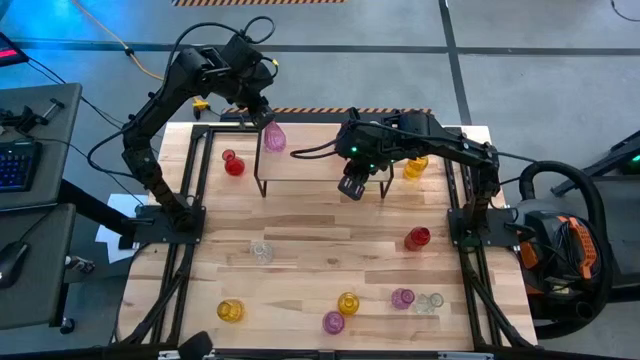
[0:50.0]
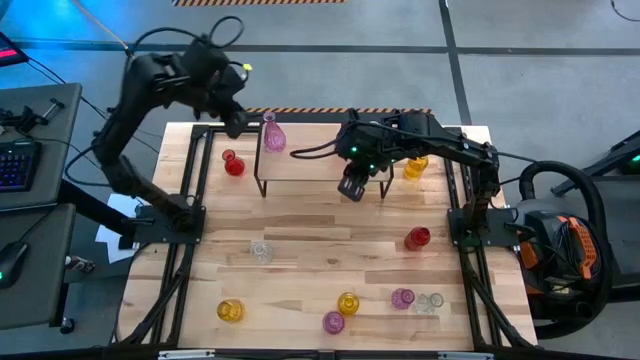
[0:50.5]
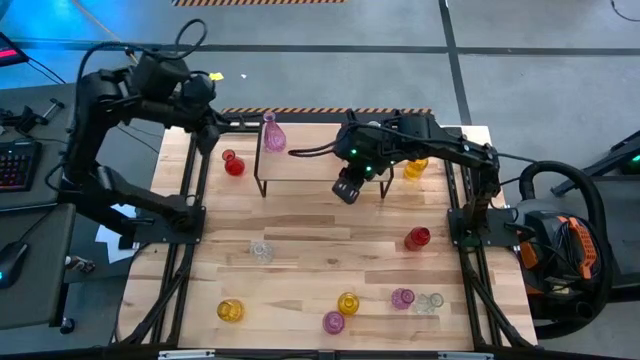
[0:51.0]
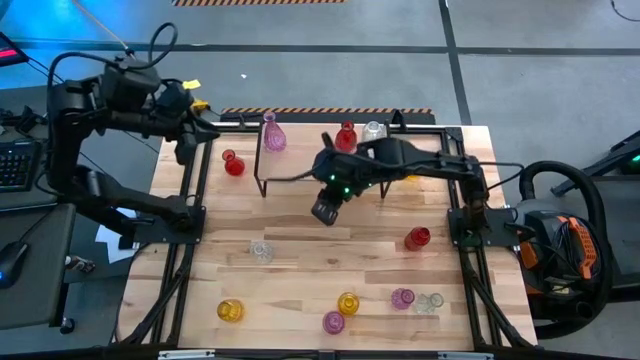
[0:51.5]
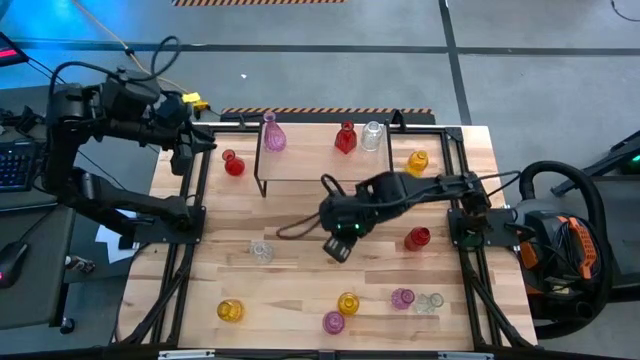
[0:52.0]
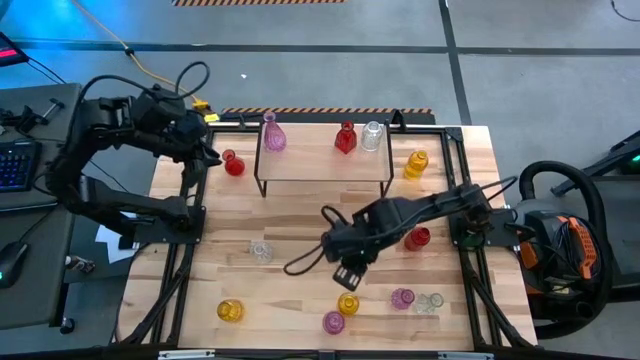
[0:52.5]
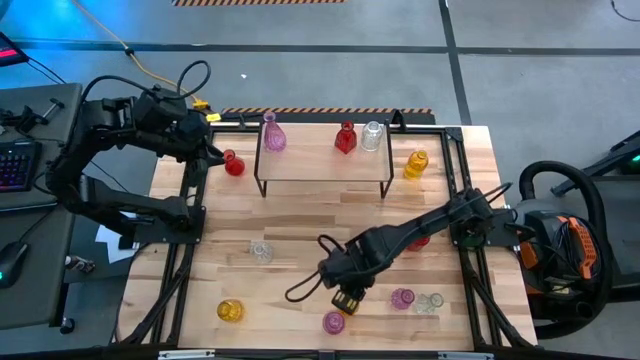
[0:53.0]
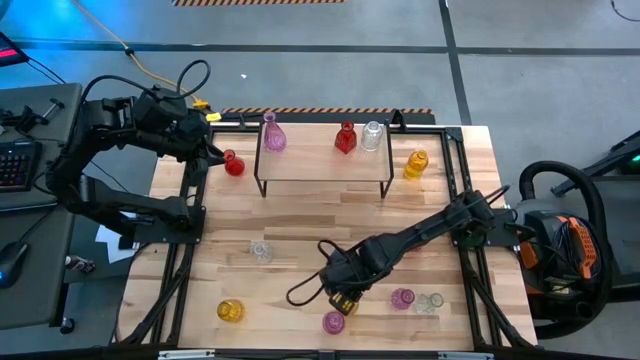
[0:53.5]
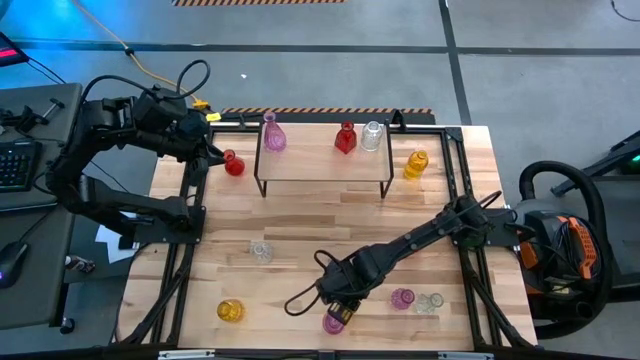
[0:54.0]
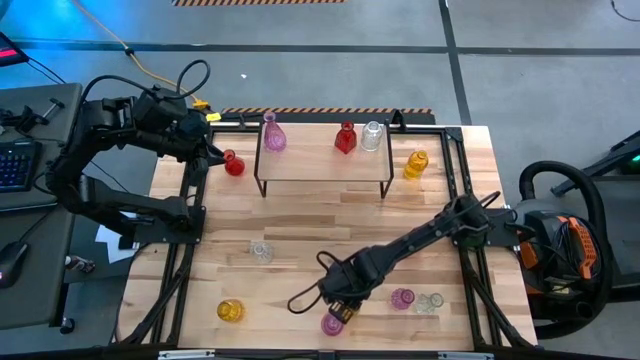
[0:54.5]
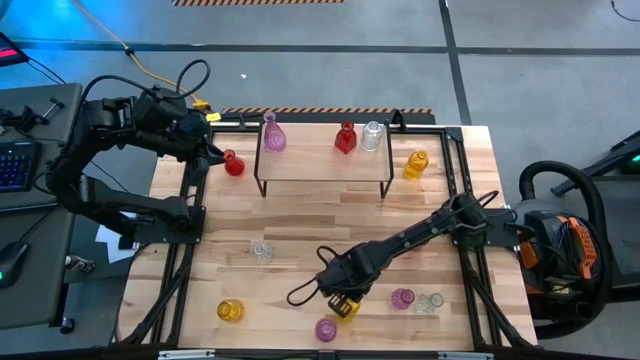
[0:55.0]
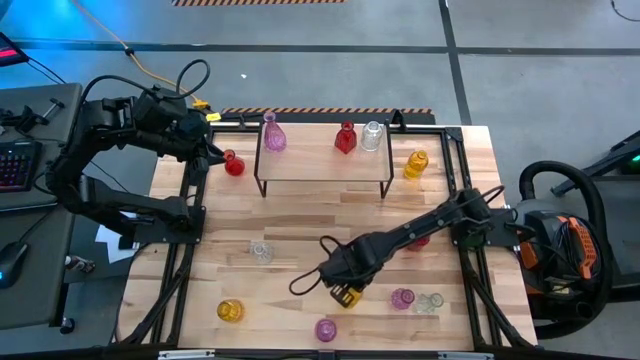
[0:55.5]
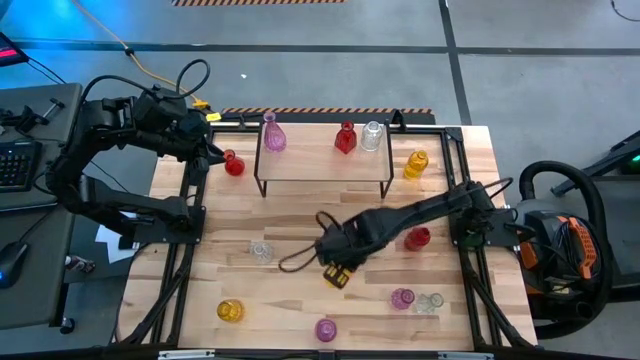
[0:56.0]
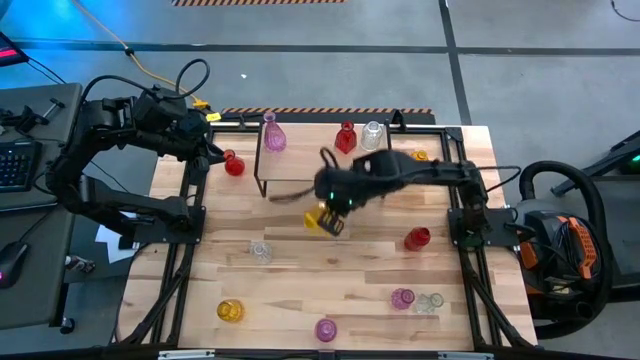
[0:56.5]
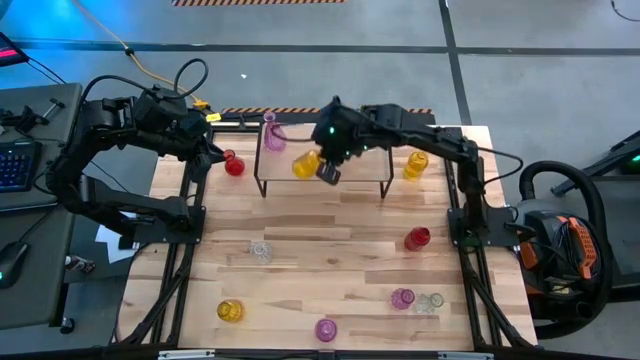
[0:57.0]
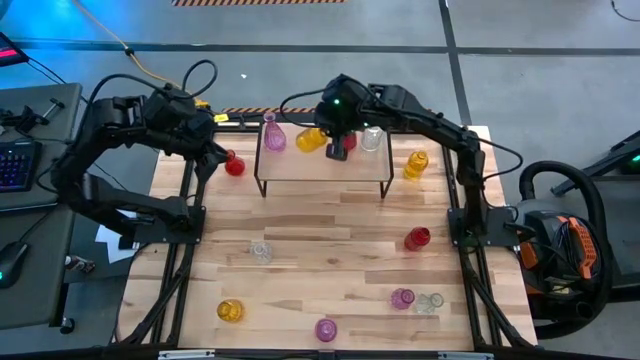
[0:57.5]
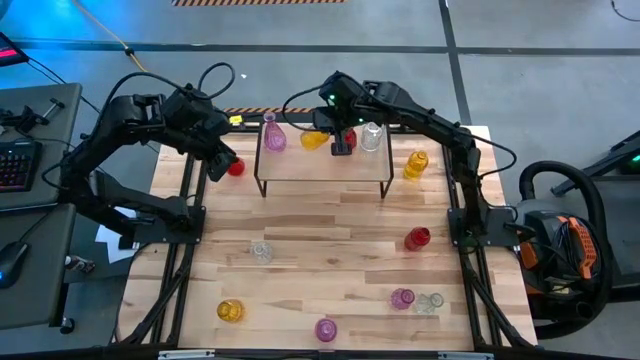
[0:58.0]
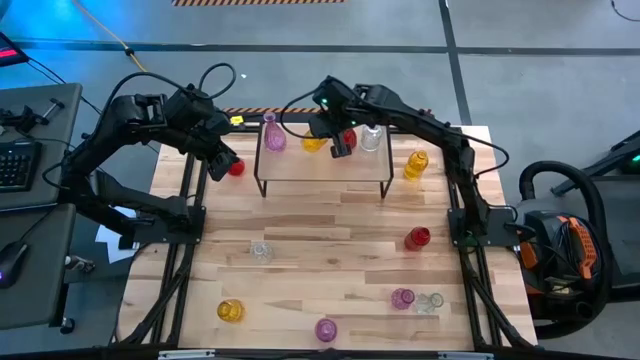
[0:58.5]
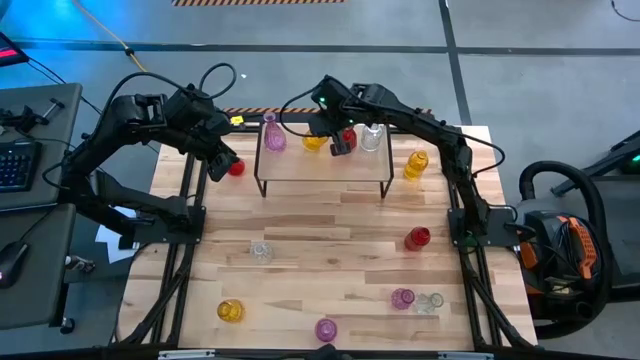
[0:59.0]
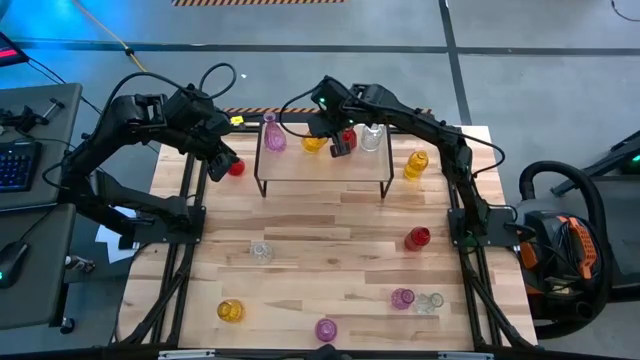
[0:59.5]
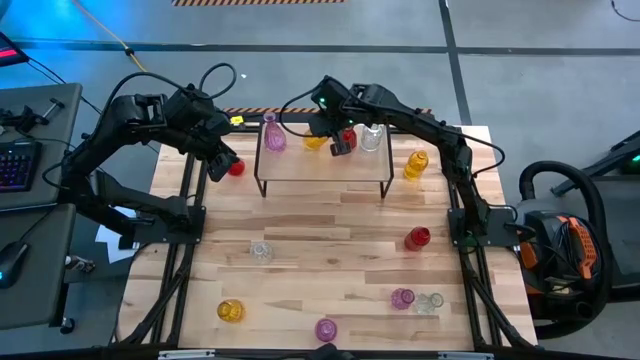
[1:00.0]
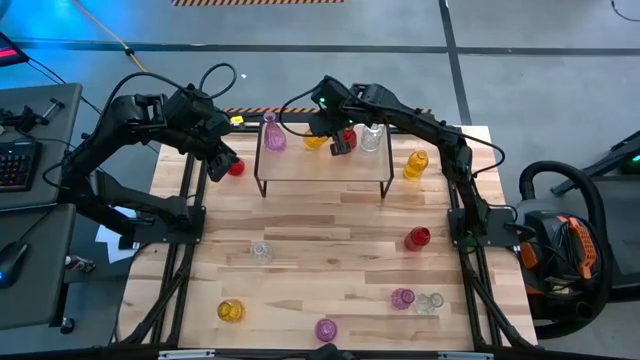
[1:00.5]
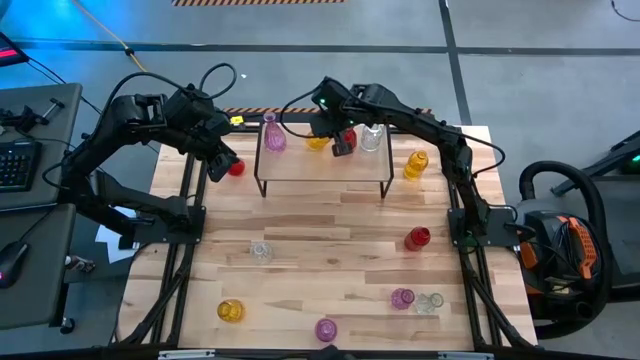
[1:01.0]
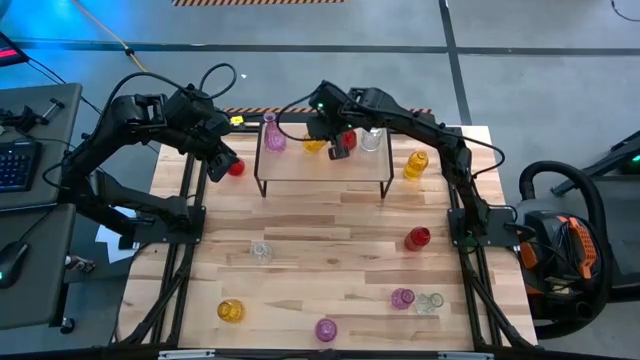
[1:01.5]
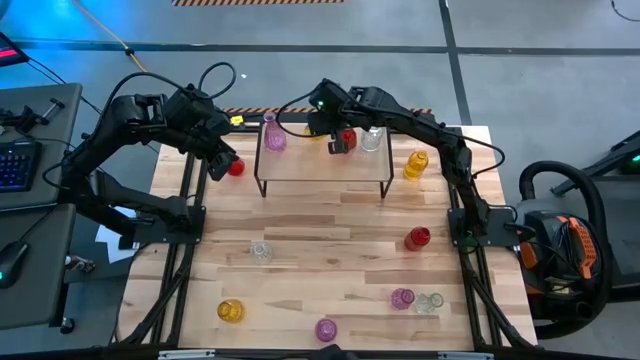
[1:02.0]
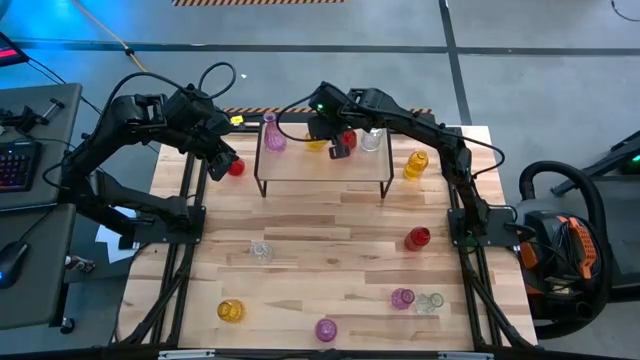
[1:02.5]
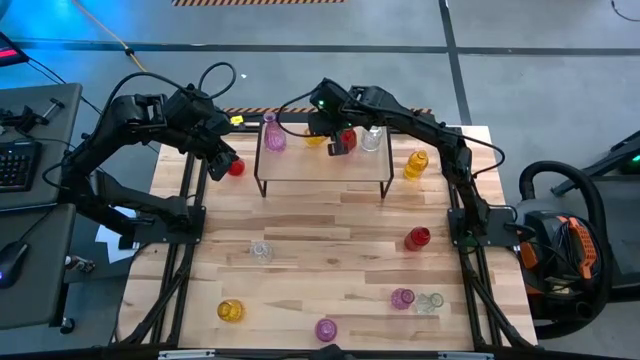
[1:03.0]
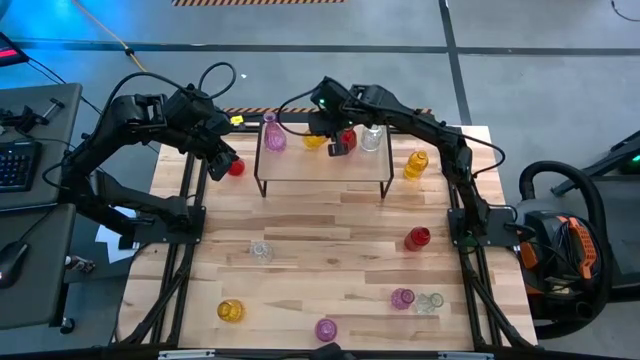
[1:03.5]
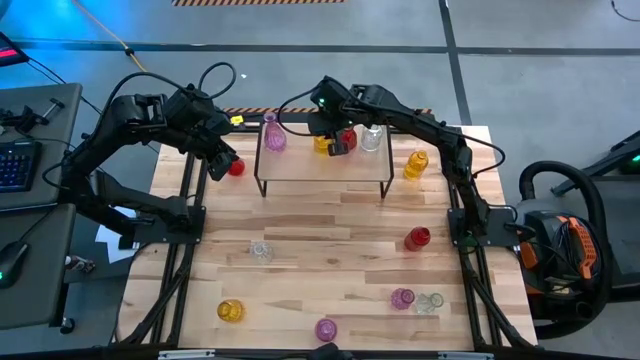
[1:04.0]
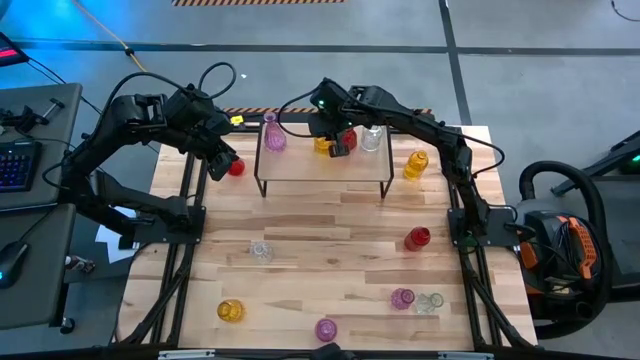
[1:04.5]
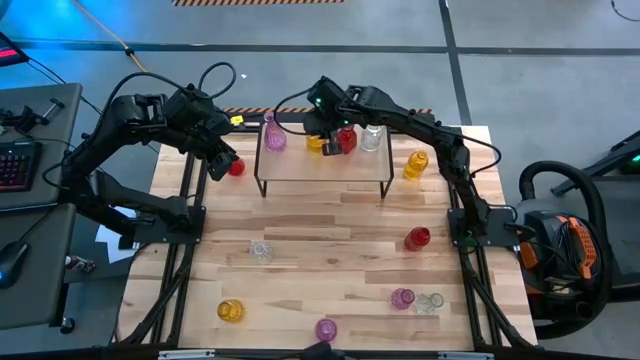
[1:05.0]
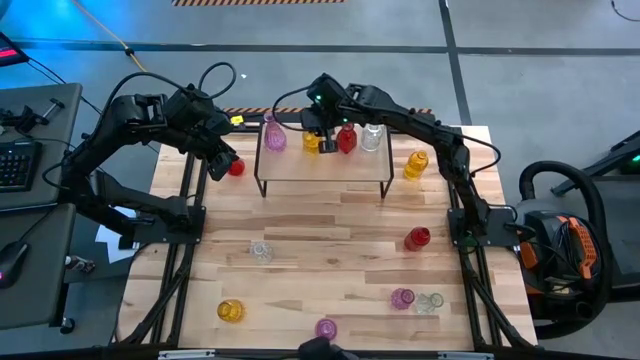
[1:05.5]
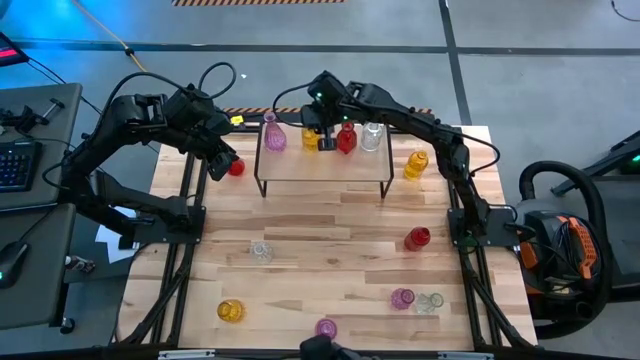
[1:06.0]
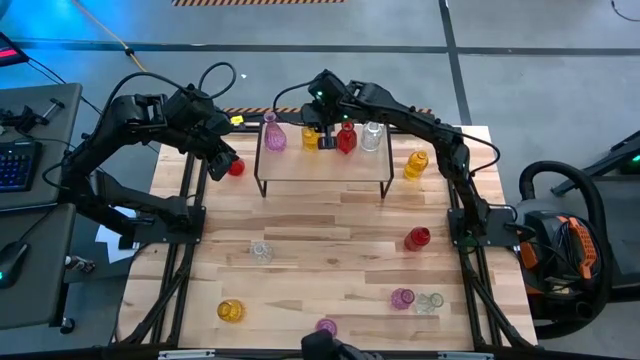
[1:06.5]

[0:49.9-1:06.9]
Task: sort vases onto shelf
Put the center yellow vase on the shelf

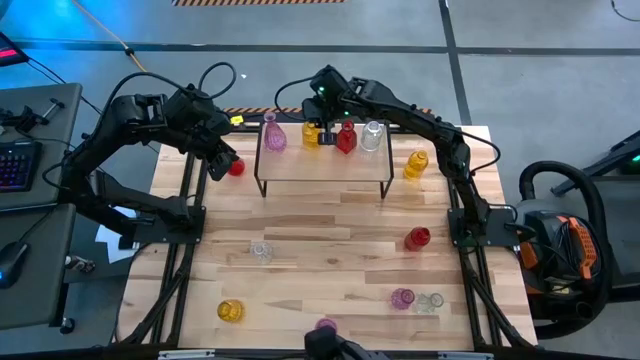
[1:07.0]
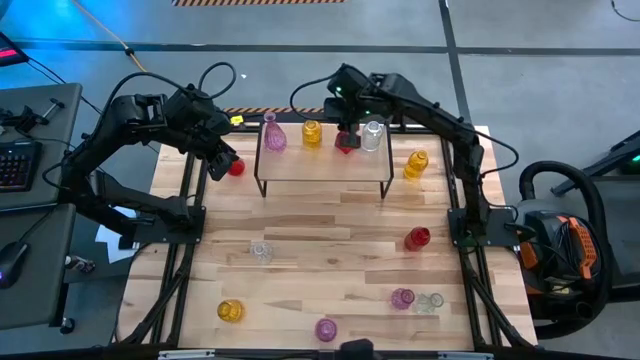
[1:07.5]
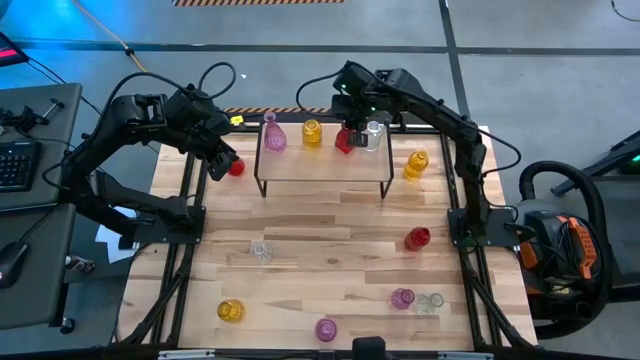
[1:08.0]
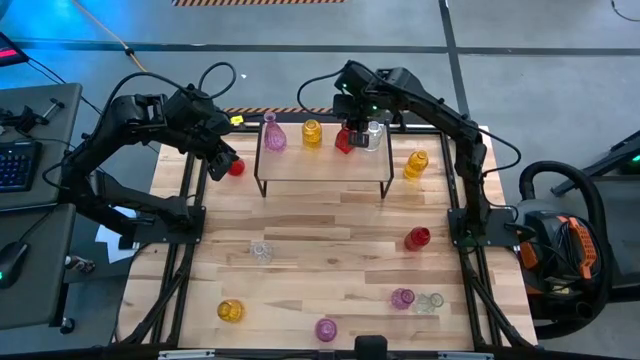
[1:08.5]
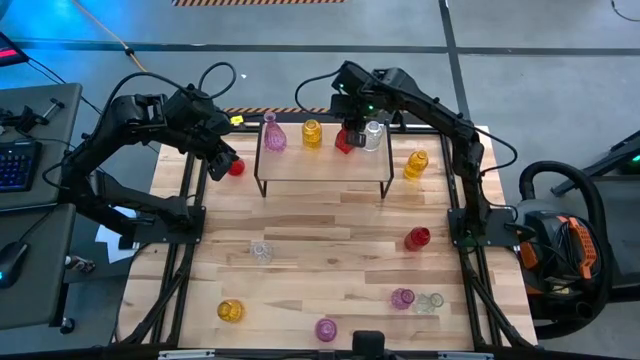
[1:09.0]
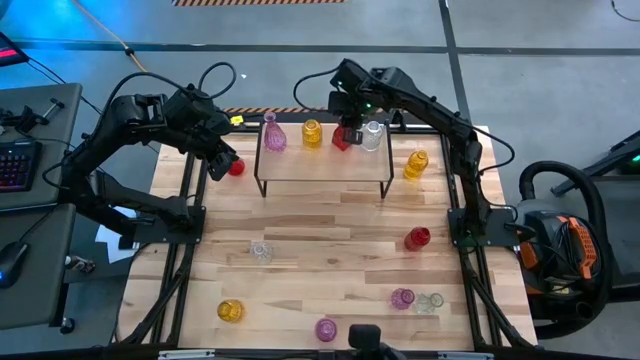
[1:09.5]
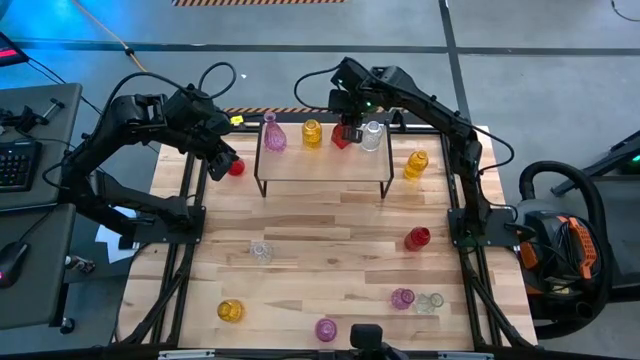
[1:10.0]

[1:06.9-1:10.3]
Adjust the red vase on the shelf
